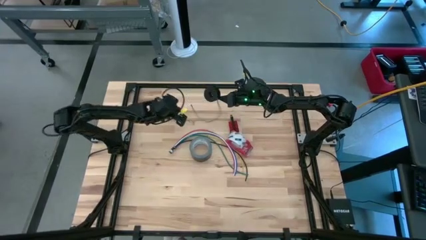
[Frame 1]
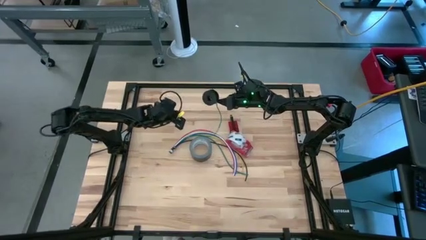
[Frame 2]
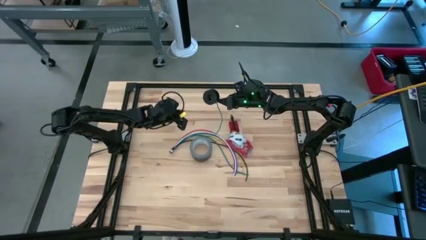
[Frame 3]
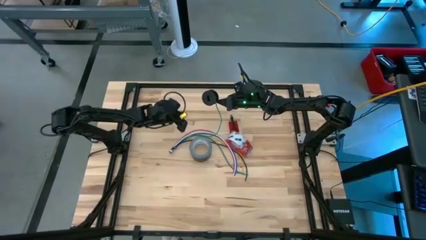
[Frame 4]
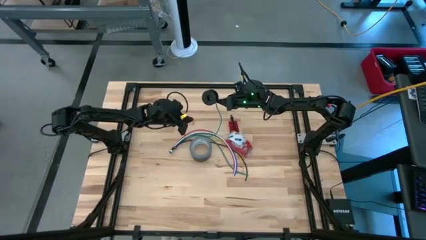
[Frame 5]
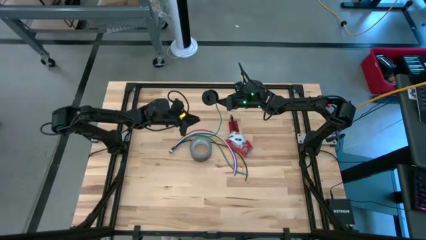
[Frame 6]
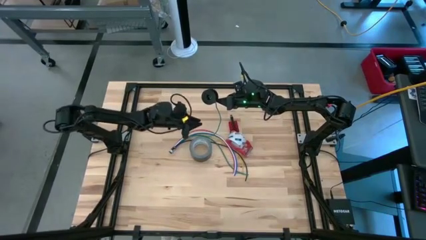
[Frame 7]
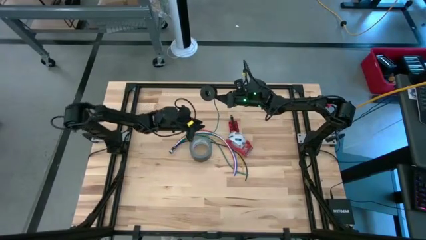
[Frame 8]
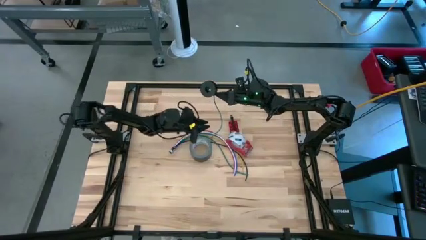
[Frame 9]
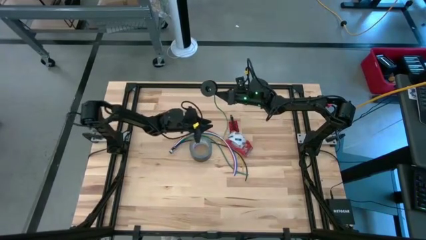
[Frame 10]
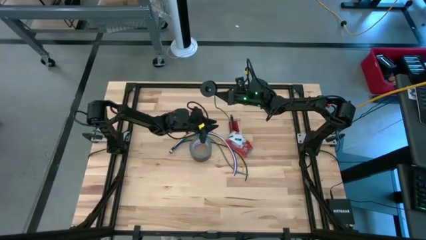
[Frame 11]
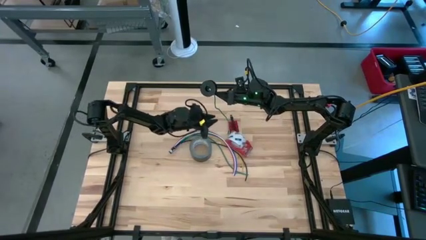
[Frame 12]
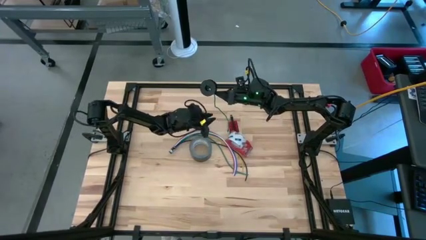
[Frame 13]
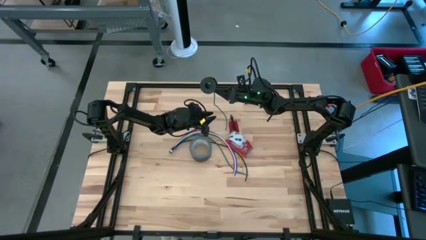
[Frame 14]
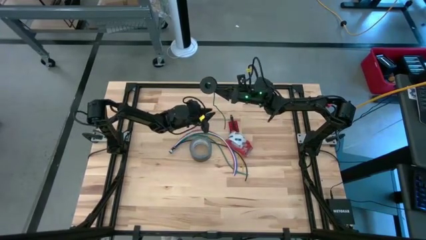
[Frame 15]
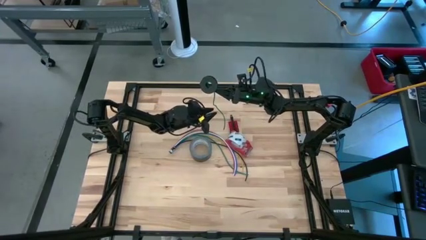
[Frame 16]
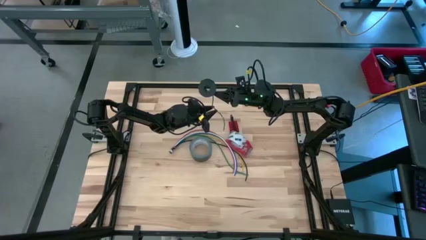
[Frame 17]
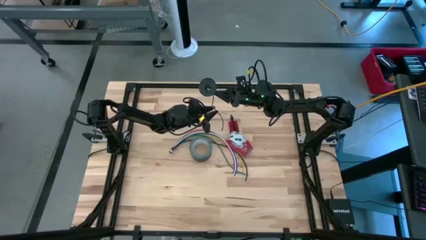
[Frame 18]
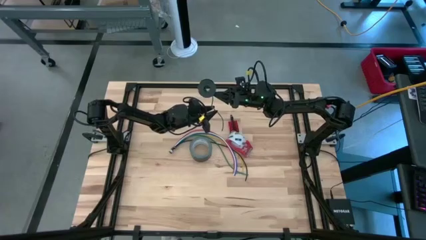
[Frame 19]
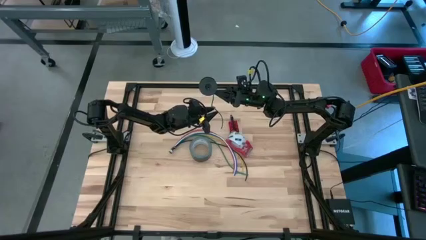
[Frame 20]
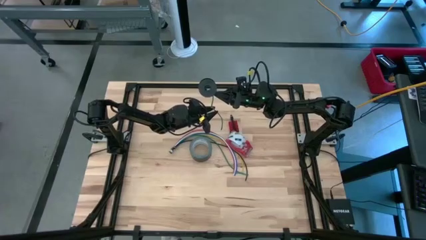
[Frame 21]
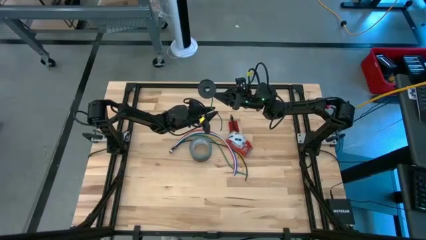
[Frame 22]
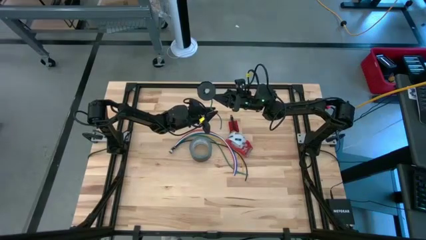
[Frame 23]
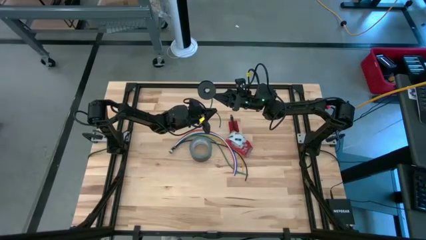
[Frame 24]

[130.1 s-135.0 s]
Task: Coil cords
Coil the green wire onto the black spool

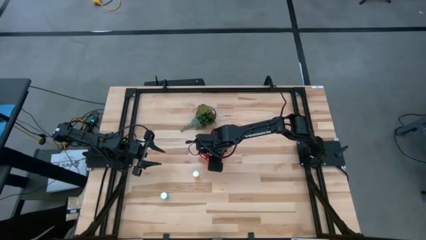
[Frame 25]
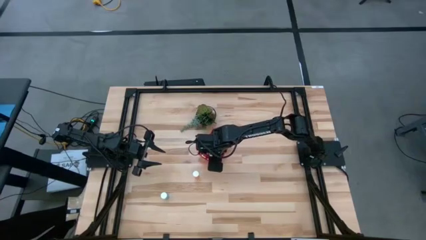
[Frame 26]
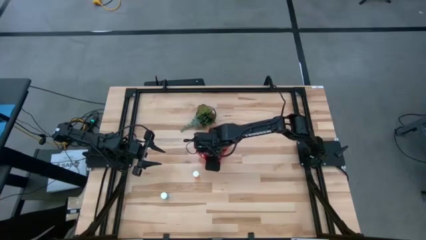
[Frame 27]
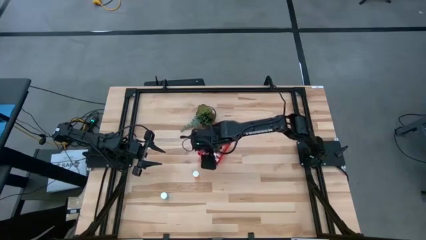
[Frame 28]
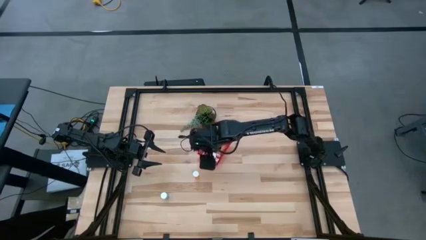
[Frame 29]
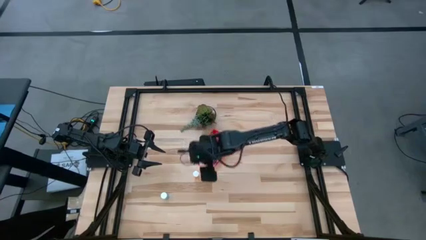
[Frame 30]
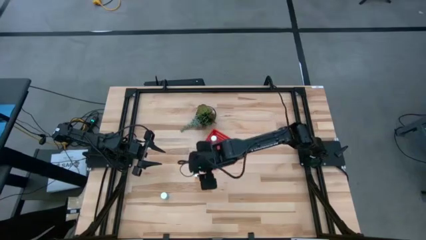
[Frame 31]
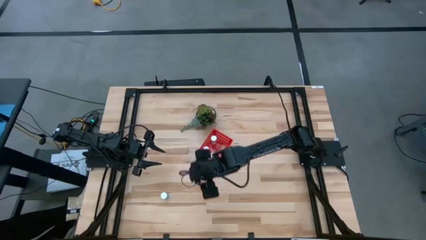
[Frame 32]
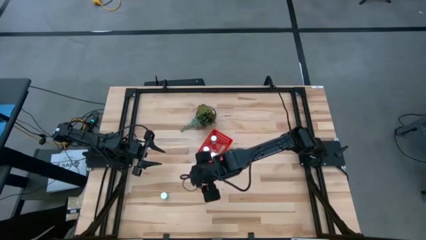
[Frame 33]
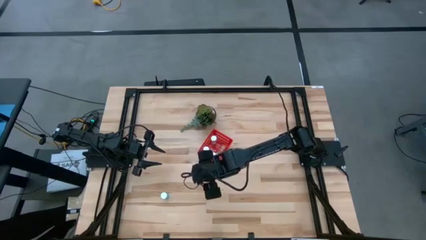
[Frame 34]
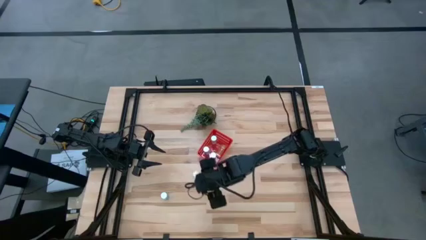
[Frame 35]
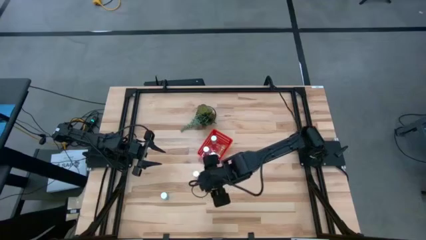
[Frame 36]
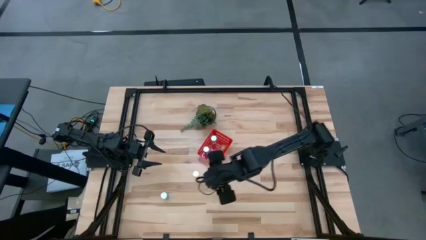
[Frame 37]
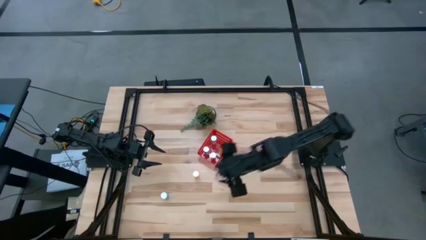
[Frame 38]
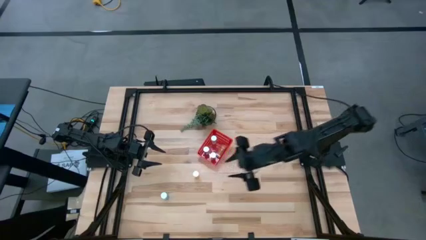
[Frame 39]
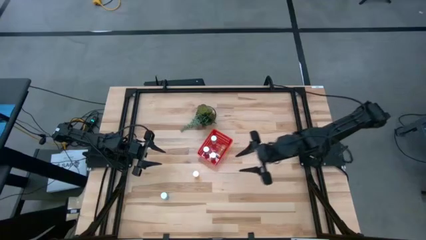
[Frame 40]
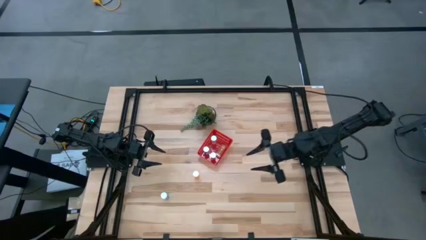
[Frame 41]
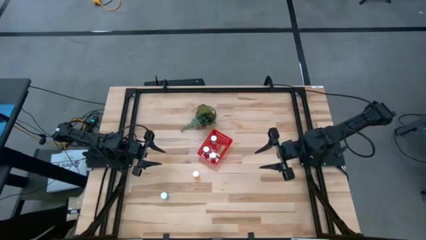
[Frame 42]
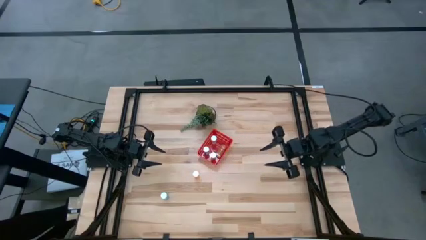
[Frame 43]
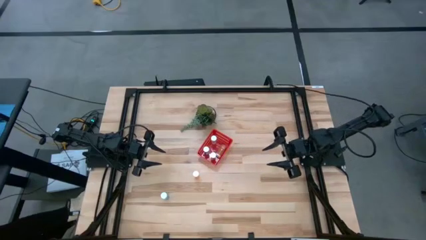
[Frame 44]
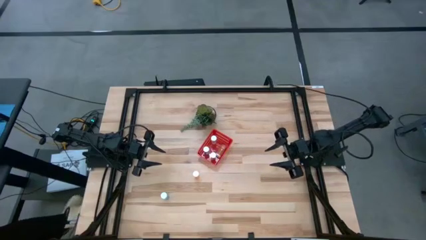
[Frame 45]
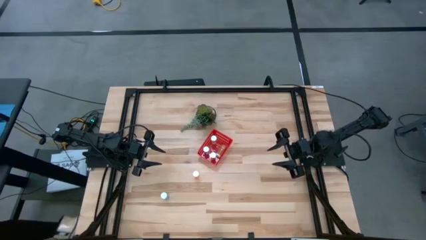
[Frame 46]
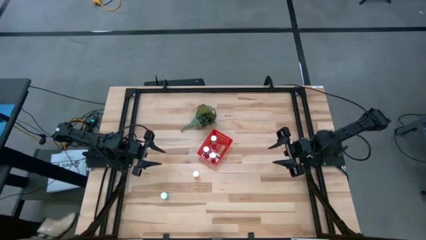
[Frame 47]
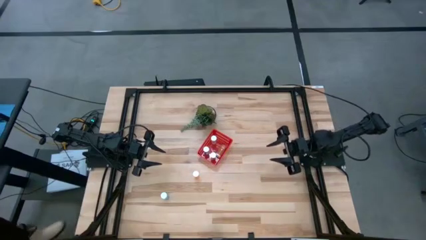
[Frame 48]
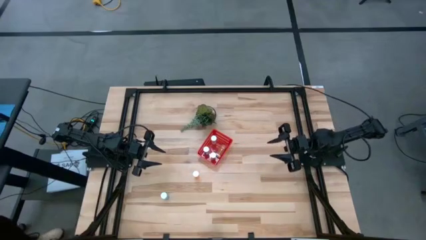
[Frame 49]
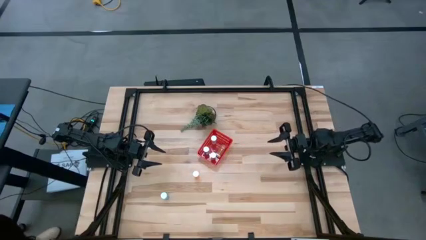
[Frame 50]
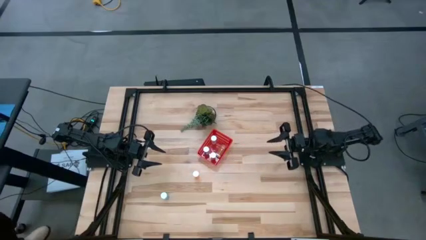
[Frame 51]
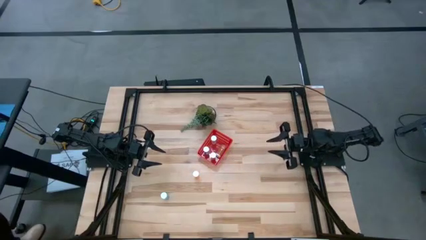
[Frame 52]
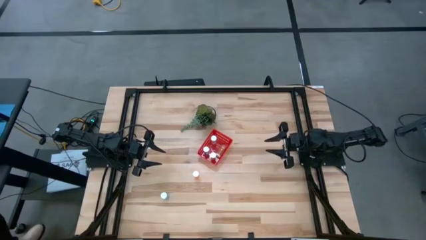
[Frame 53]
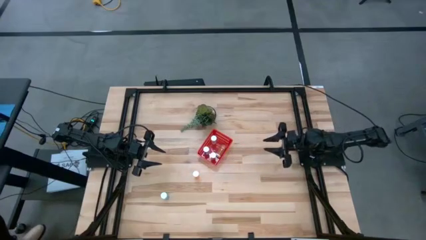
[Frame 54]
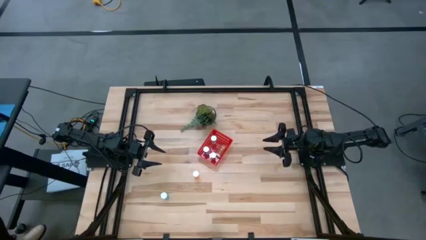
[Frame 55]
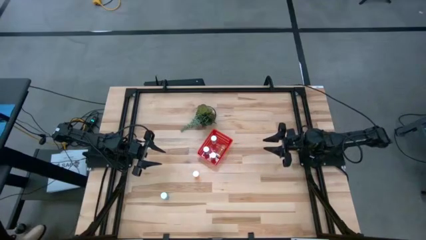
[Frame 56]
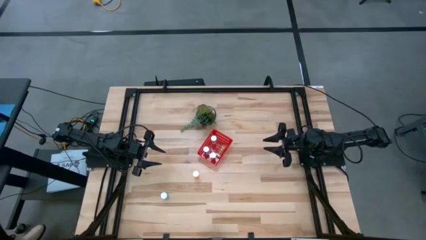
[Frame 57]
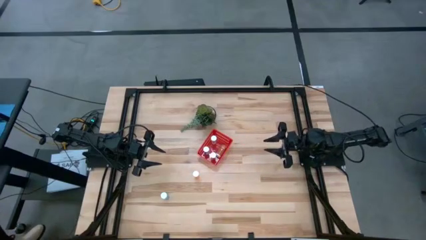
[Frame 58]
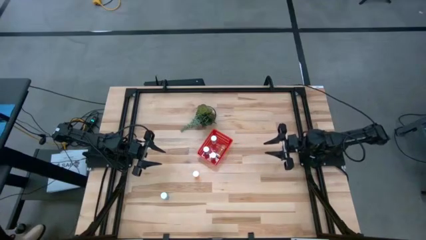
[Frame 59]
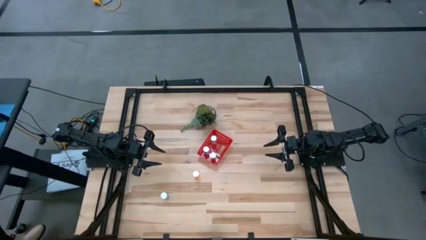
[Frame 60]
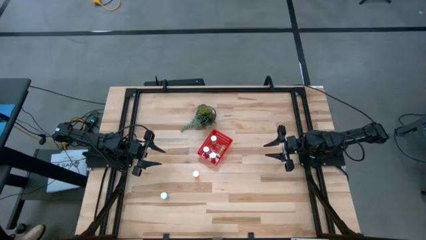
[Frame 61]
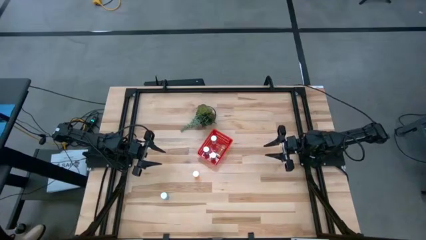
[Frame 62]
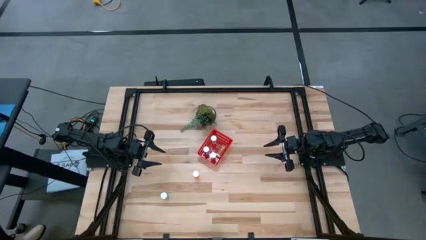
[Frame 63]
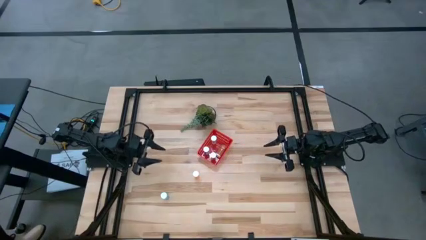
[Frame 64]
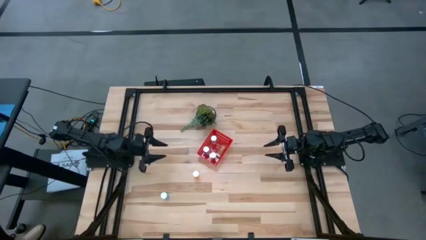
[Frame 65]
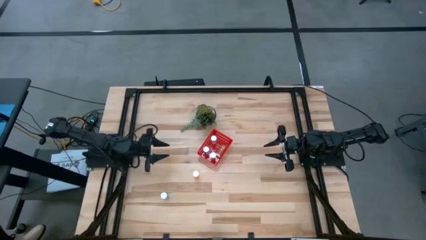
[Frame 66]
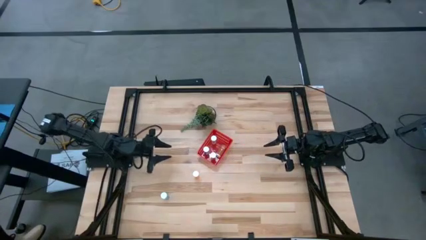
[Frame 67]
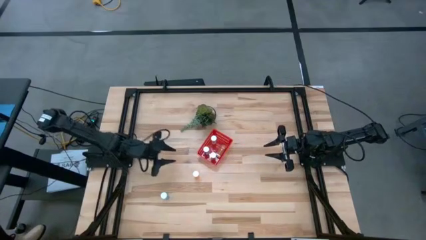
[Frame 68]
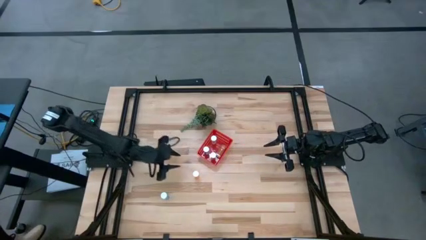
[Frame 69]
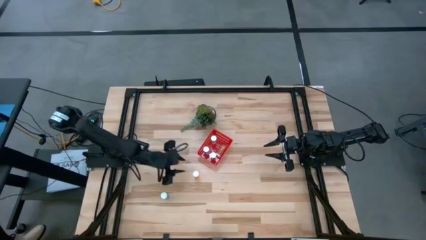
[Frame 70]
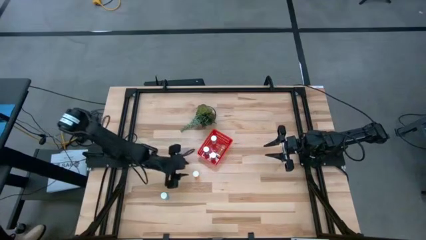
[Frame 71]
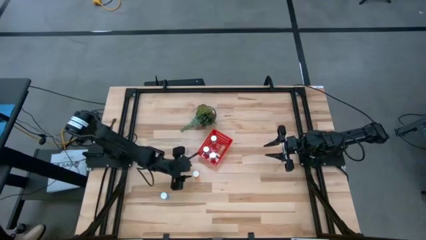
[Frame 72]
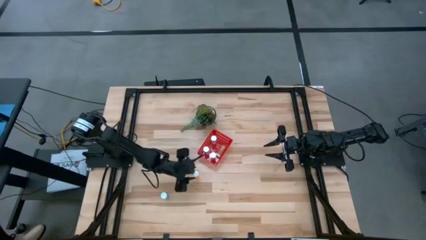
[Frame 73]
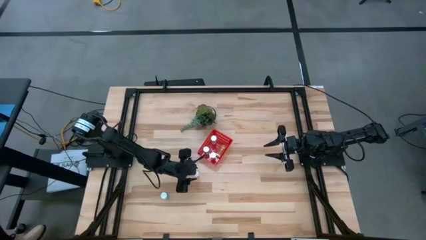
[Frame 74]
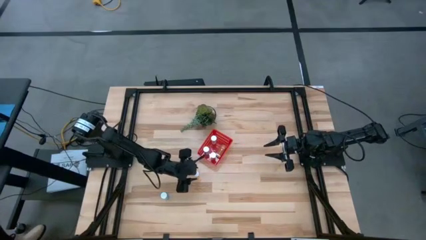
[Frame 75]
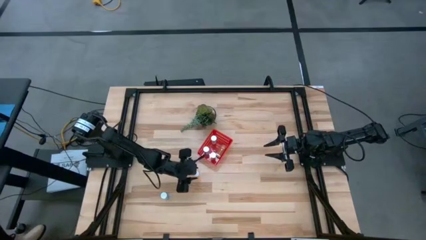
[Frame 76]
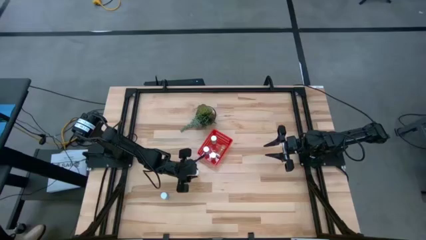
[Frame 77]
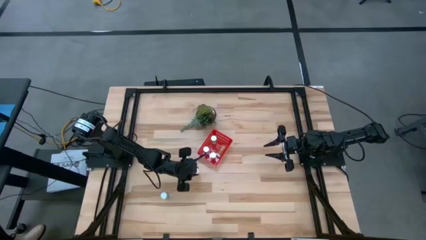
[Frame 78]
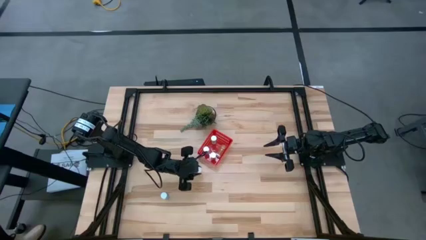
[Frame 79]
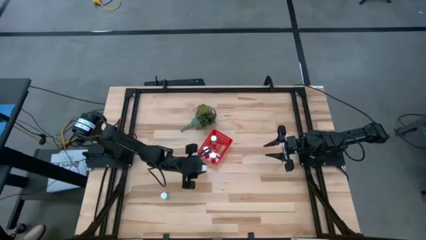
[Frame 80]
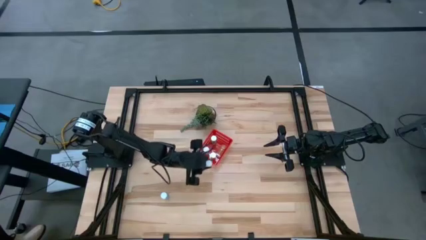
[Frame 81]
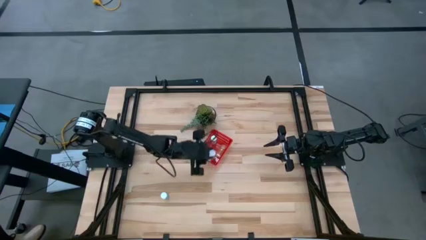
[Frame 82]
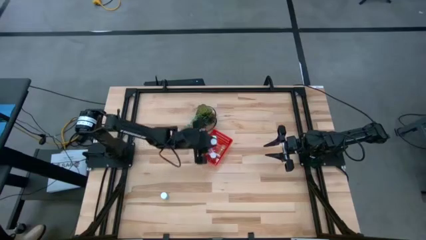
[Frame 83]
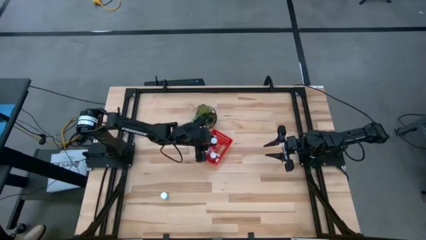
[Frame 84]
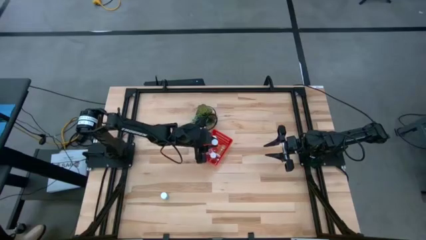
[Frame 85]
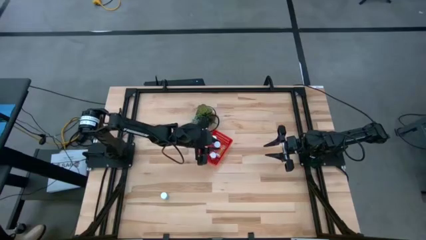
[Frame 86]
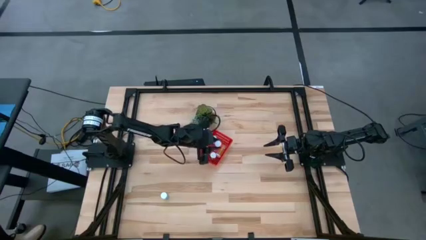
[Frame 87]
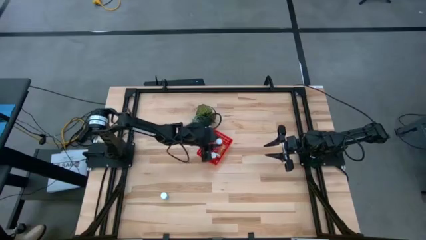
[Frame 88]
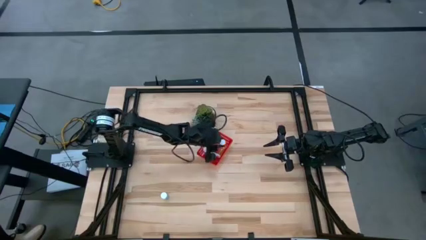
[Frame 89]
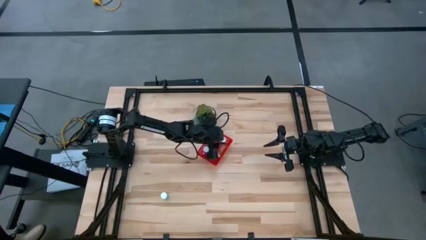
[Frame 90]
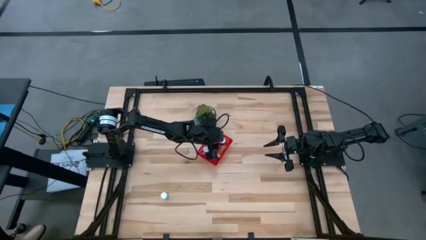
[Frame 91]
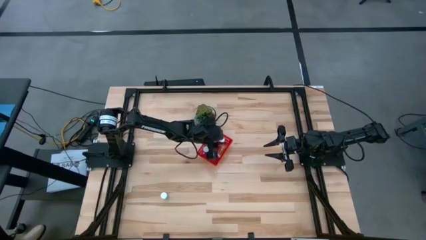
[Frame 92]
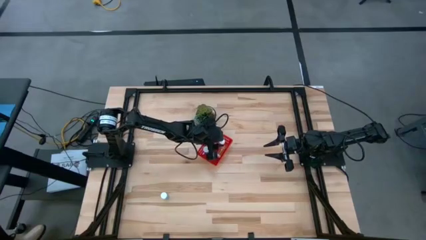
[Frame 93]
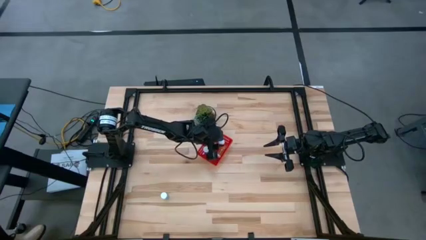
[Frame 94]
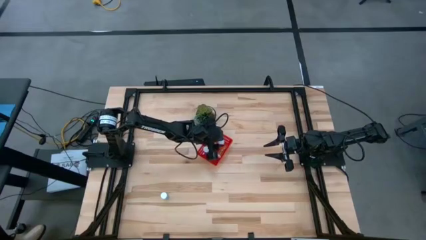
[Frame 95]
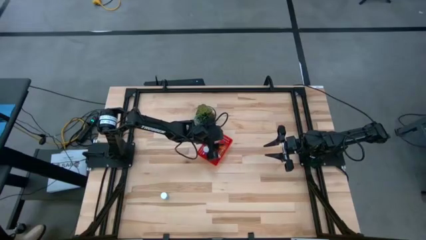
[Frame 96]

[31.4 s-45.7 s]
Task: Pick and place pill bottles into a basket
Put the orange pill bottle into the red bin
